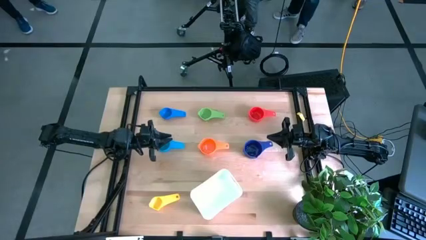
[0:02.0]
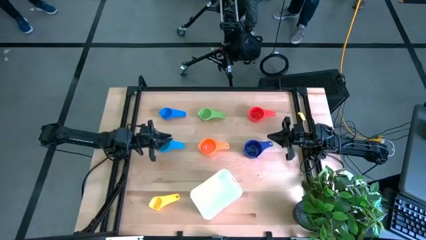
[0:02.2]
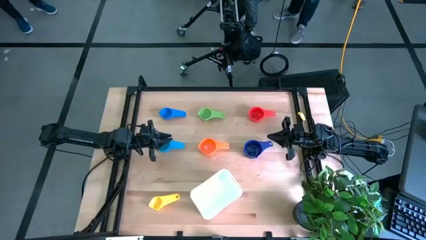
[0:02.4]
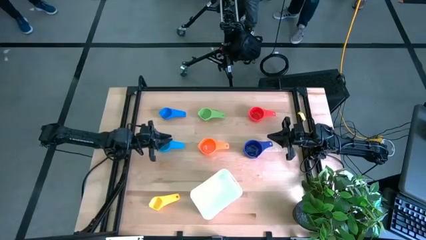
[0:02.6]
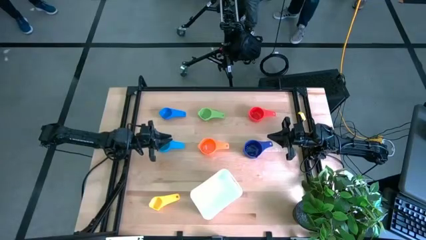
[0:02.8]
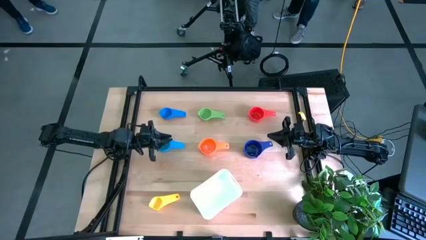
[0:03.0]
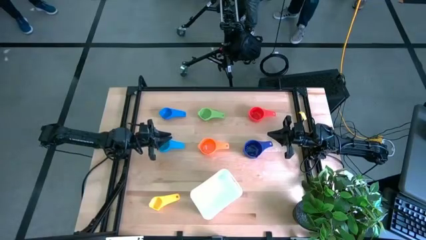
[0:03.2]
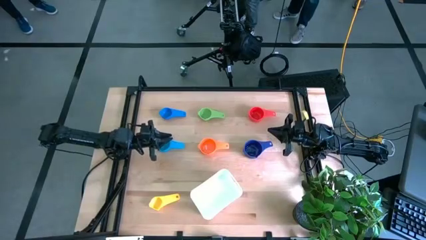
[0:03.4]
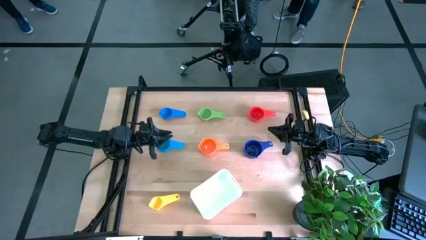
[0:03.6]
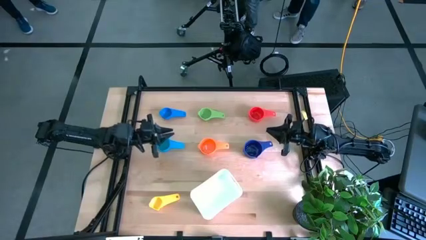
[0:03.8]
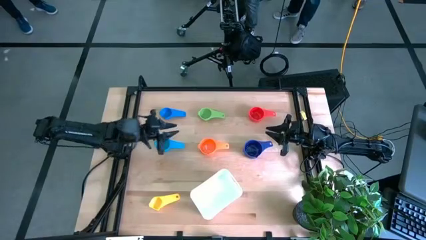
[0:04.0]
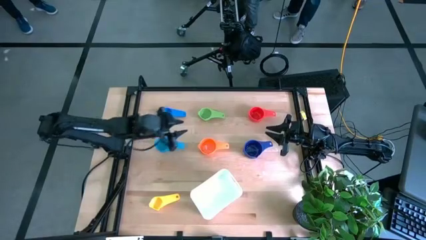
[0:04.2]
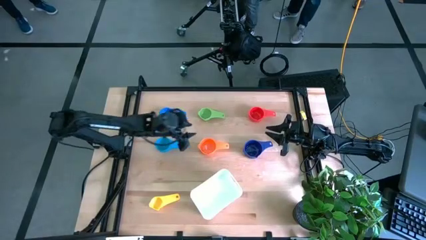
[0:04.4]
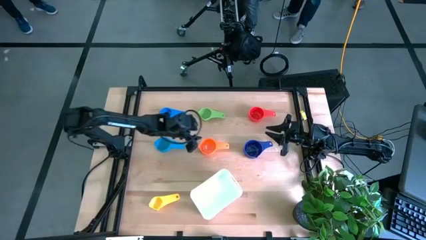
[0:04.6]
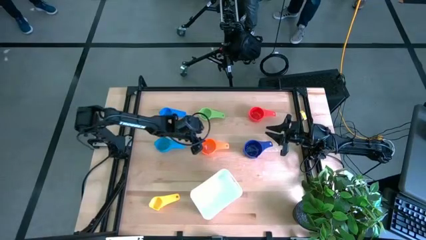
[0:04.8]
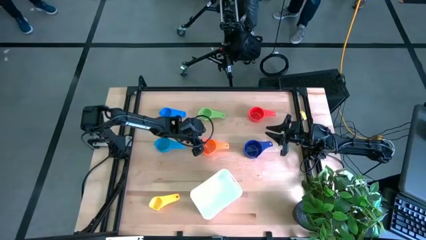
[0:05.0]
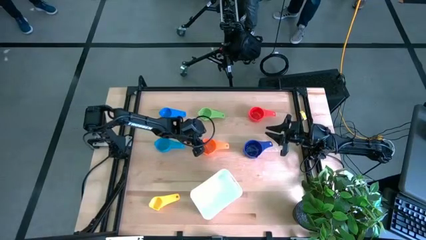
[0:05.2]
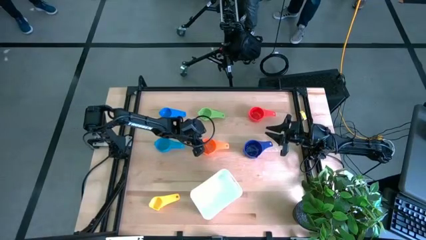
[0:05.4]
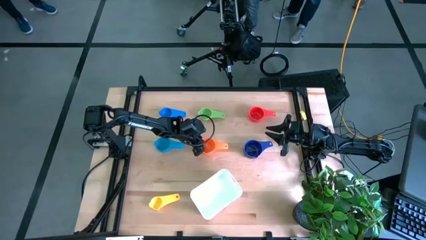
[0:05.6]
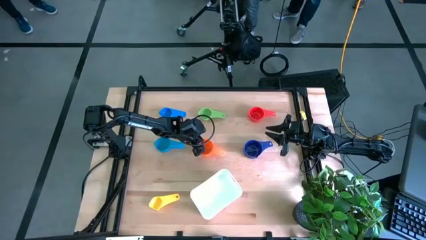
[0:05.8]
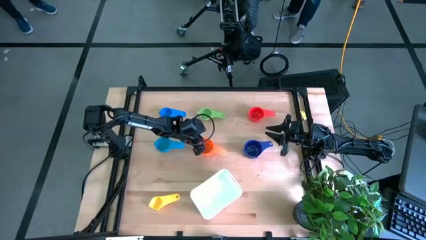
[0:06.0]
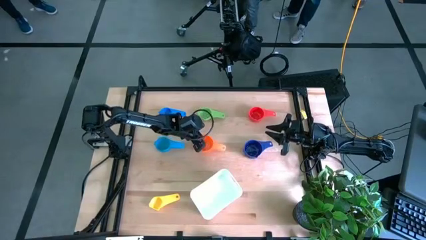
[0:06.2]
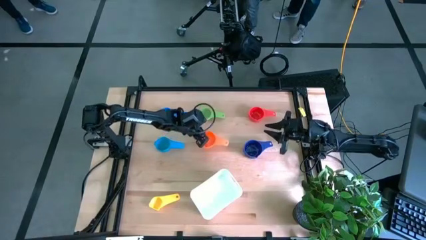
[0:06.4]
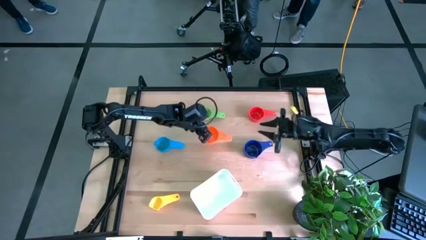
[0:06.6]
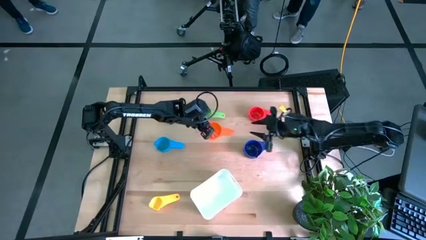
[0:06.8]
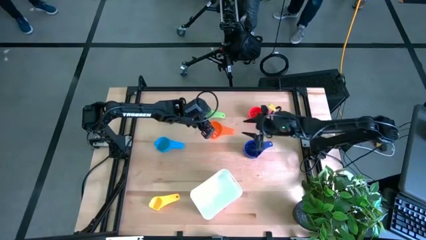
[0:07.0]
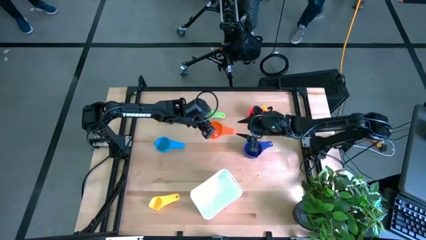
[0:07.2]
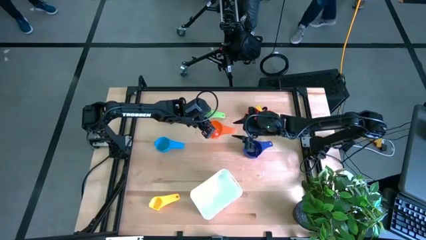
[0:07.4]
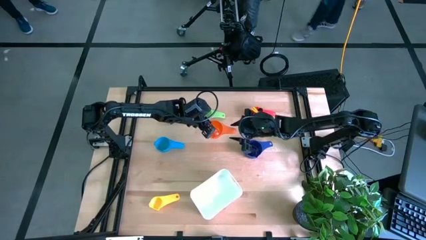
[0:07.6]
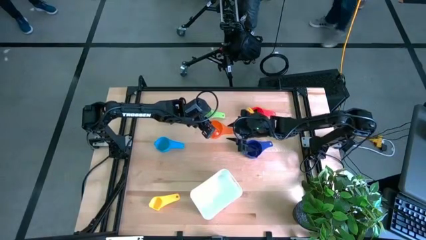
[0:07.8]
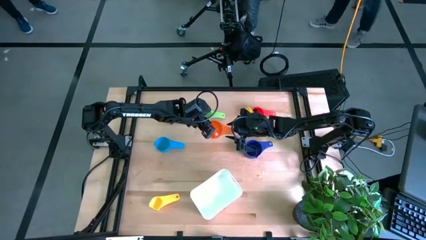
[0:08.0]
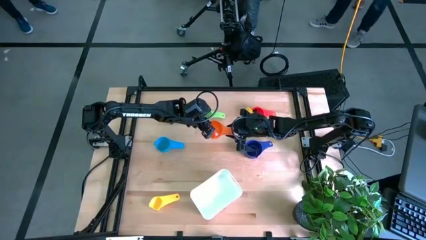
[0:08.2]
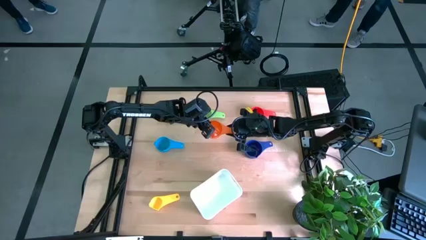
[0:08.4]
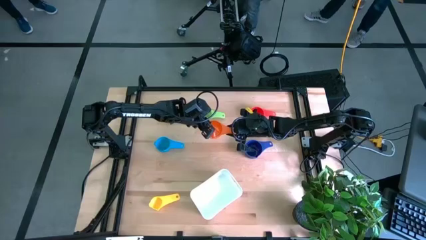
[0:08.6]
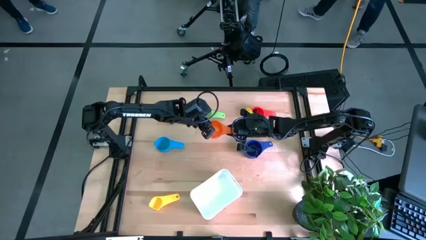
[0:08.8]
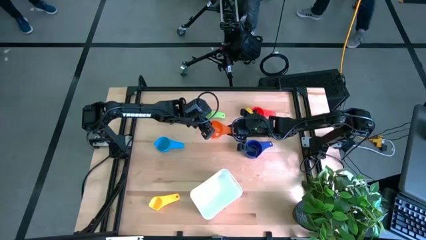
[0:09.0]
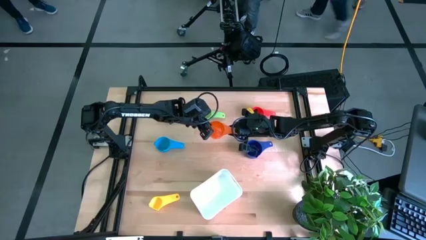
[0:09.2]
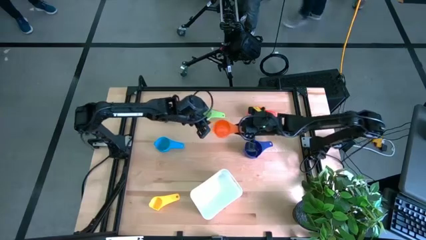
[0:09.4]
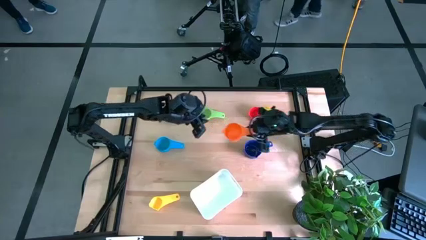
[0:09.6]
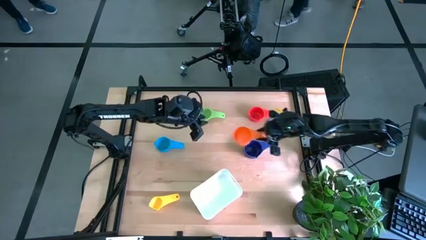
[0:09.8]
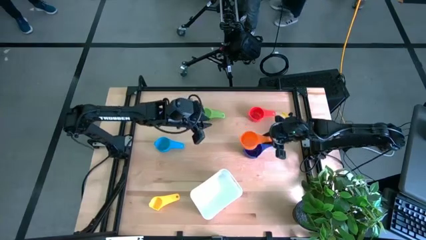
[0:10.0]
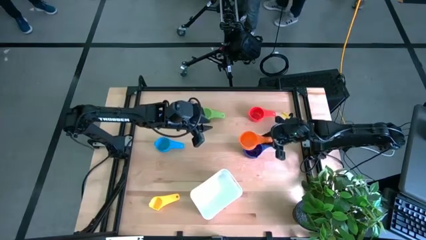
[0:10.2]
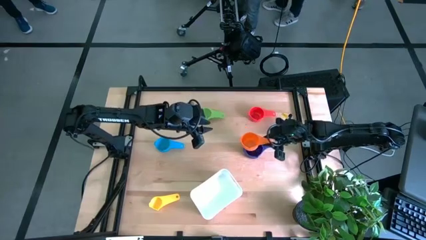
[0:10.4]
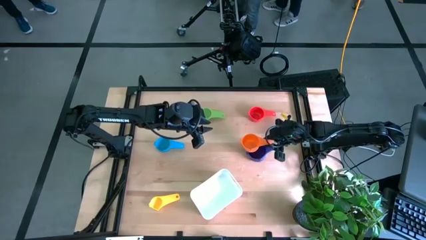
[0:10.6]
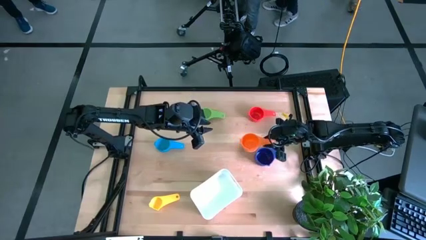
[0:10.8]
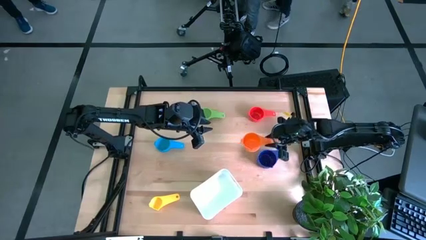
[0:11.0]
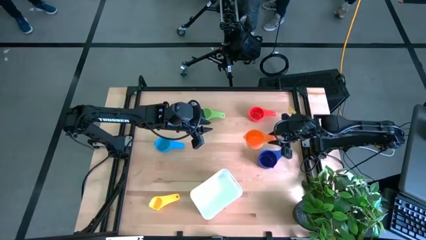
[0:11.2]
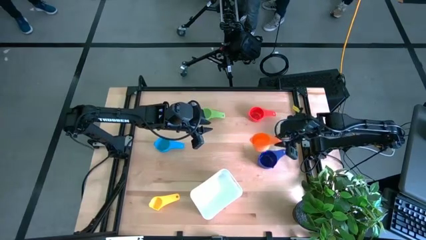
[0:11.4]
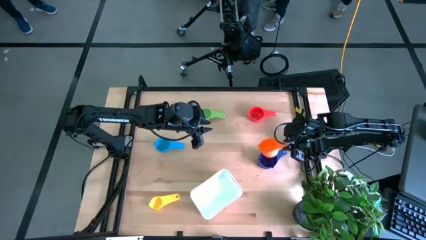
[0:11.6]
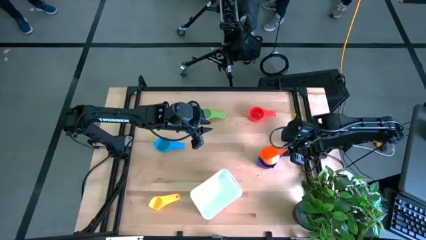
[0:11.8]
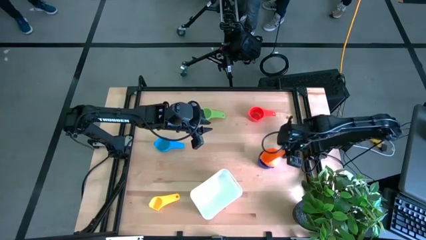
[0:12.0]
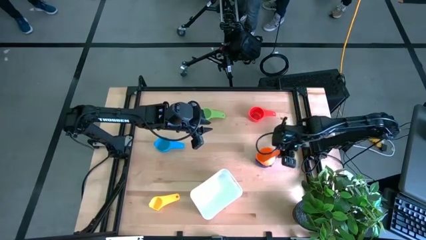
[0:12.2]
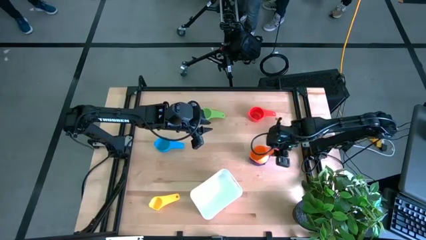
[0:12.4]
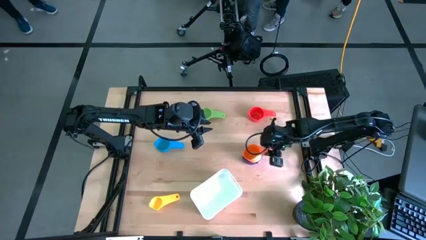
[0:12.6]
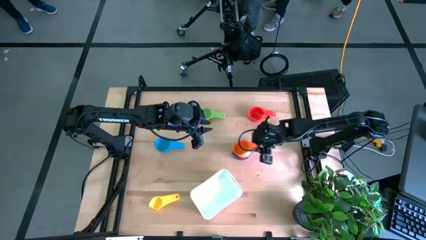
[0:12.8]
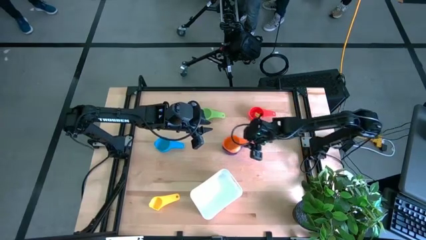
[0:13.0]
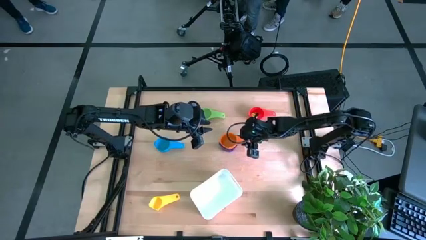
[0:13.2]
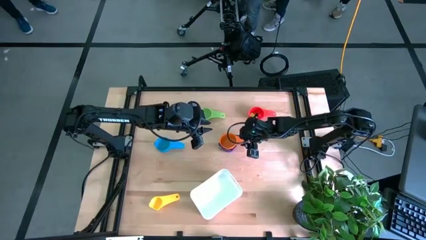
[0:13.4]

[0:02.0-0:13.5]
Task: Nest measuring cups in basket
Stack the orange measuring cup on top of the violet measuring cup

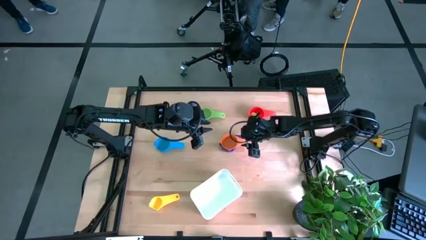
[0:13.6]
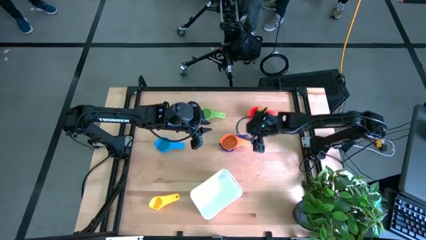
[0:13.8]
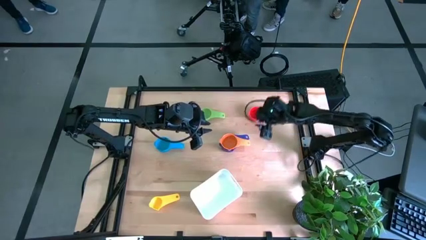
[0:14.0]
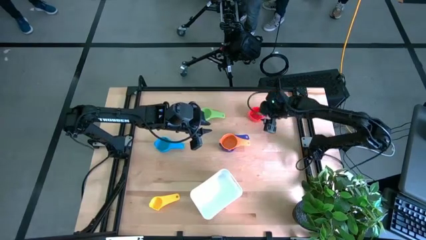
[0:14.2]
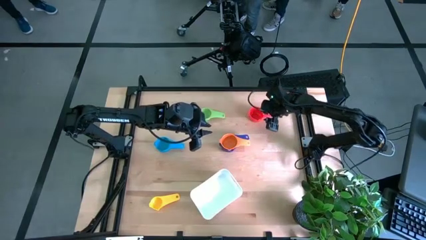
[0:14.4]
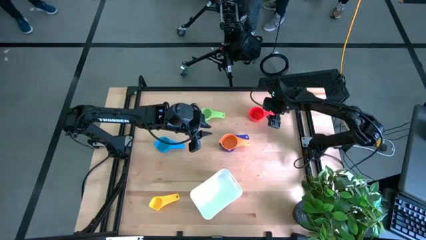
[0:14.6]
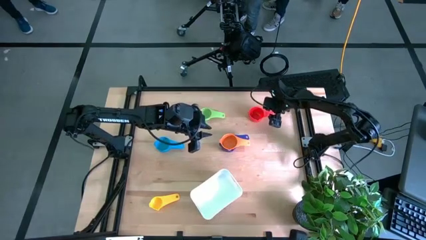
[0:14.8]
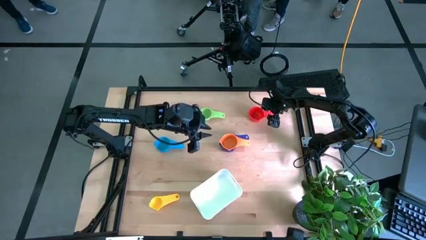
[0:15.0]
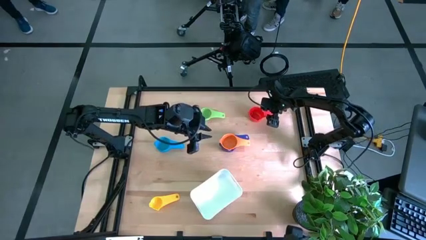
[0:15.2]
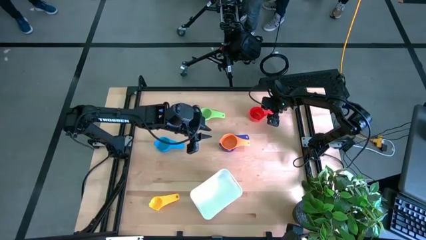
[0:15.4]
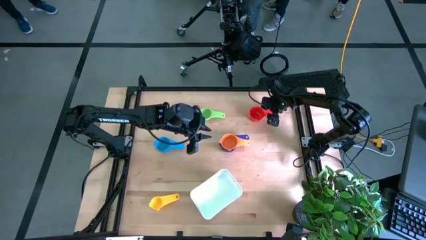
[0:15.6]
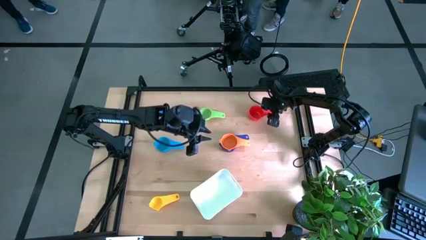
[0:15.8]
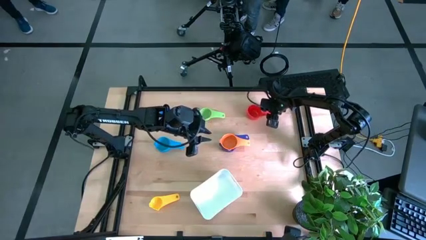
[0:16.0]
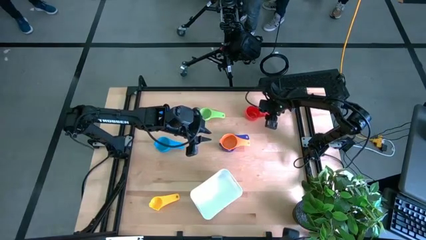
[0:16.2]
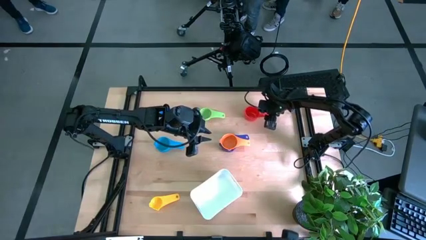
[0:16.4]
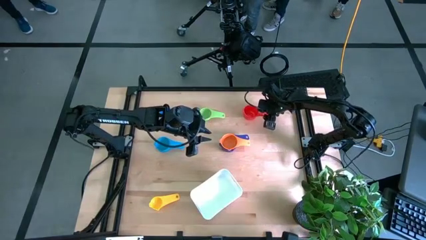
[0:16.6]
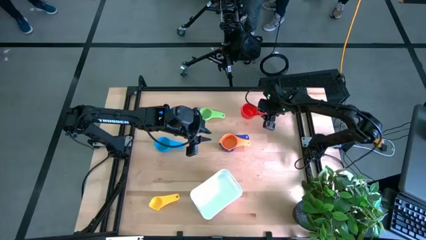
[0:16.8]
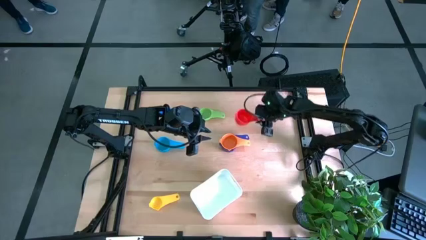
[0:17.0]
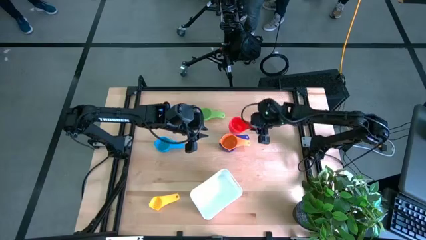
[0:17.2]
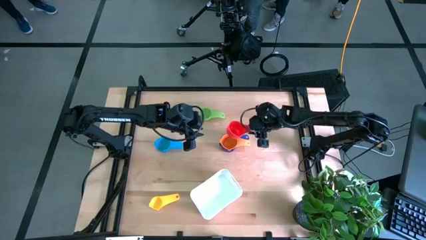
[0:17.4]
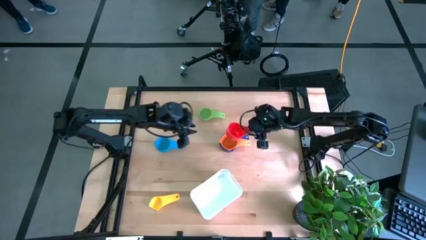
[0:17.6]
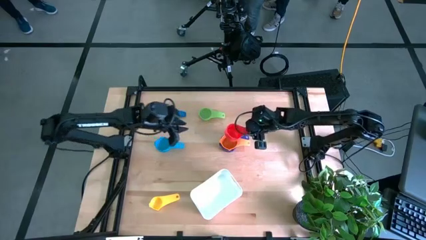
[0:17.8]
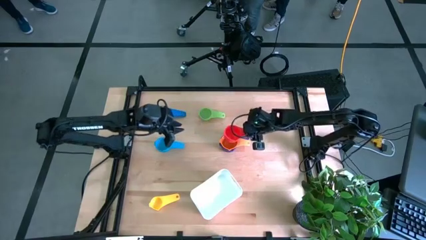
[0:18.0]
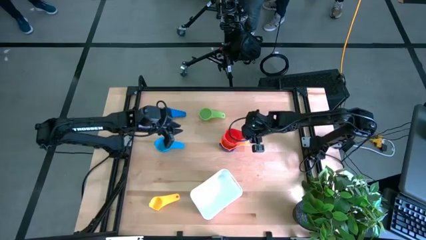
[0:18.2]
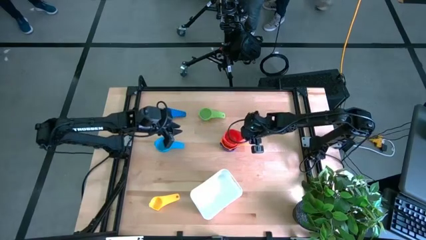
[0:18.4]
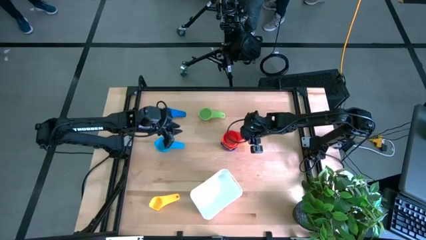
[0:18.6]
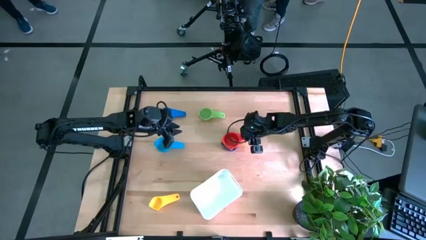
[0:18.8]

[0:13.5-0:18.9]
Stack the red measuring cup on top of the orange measuring cup
